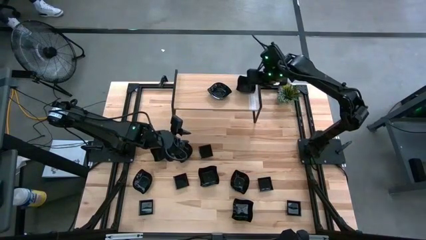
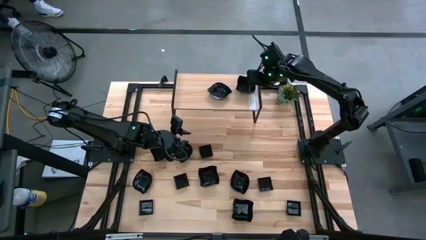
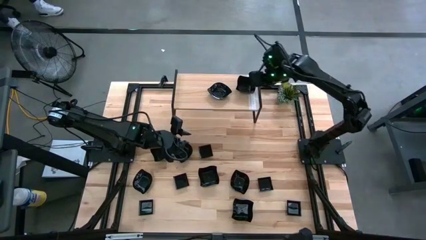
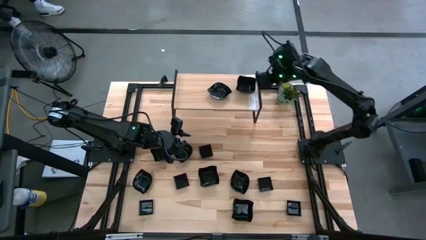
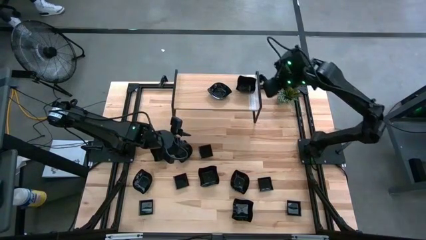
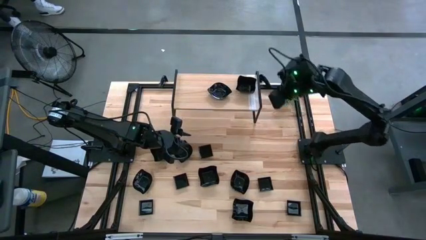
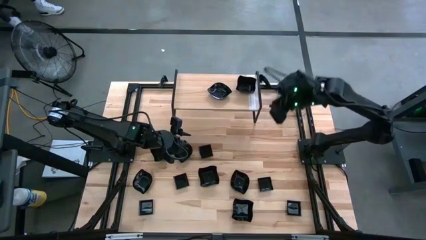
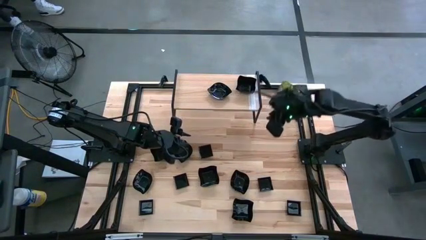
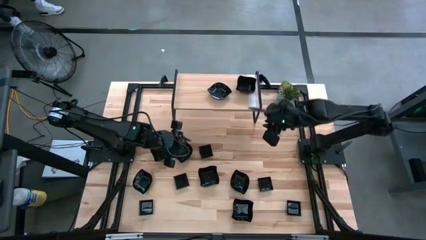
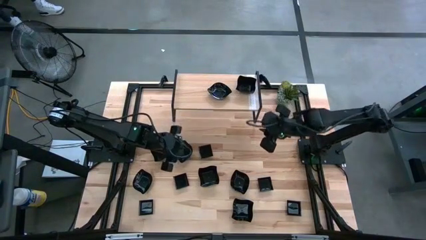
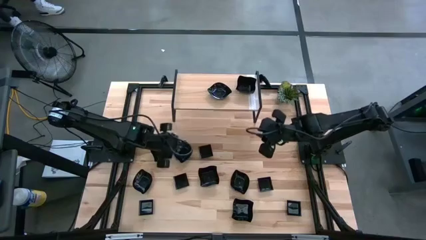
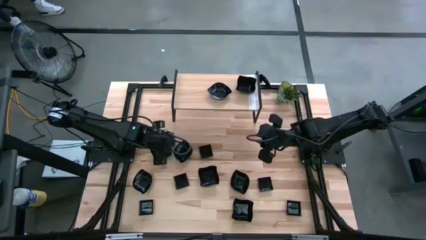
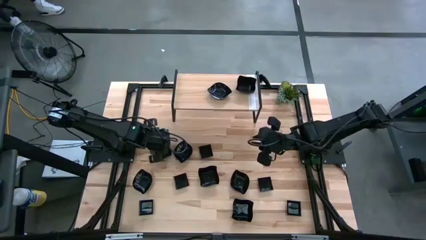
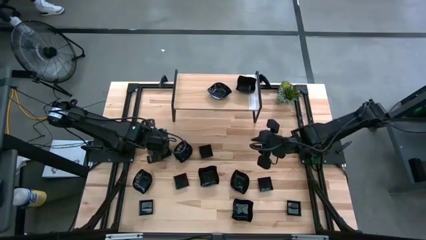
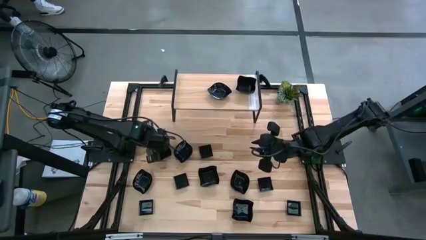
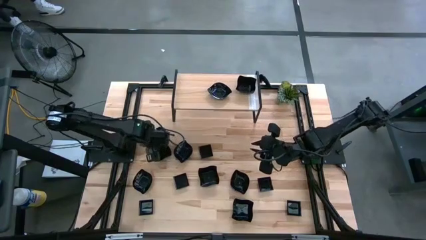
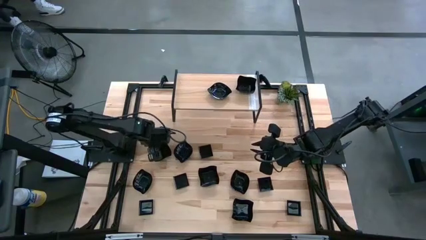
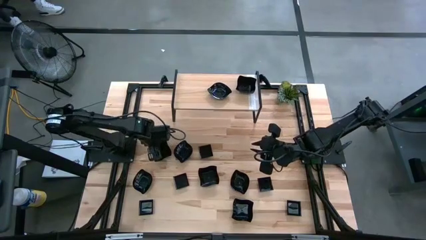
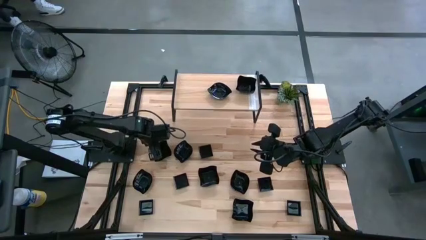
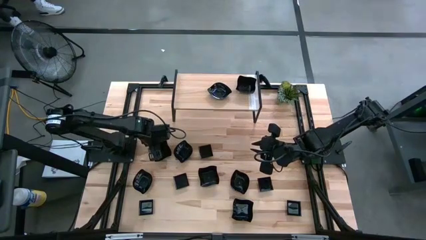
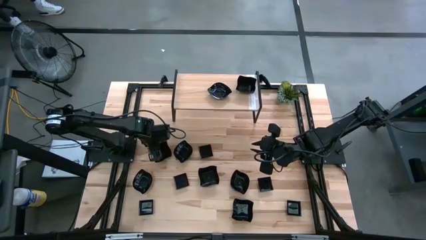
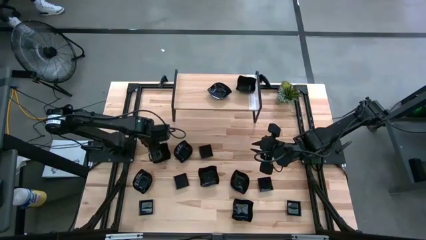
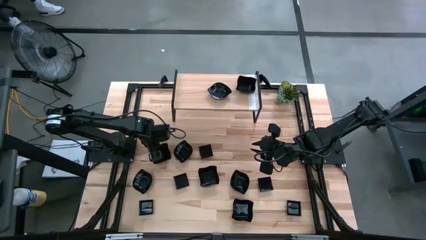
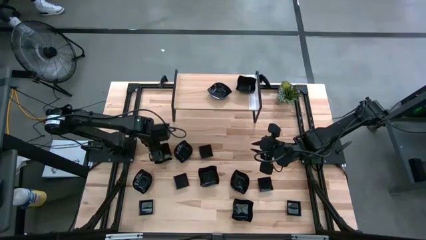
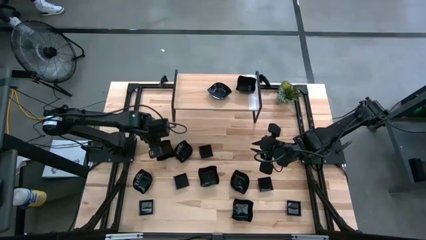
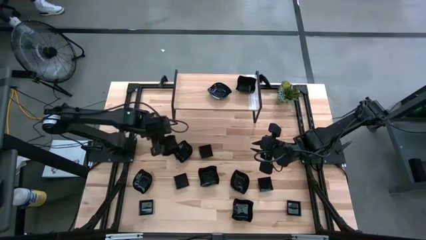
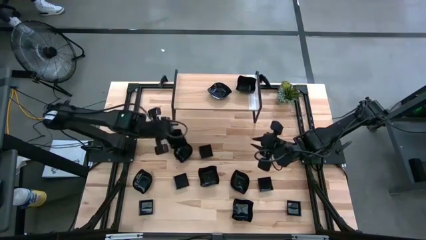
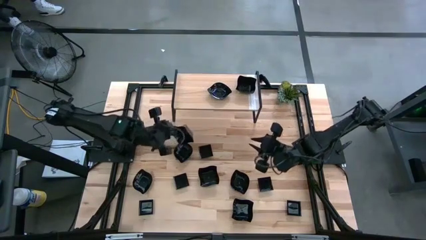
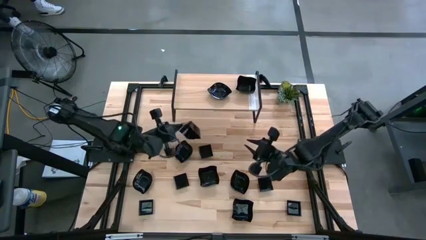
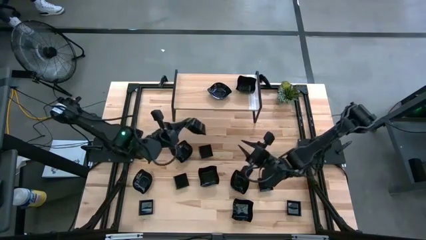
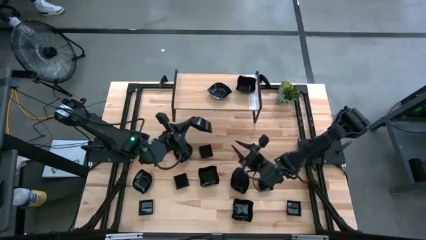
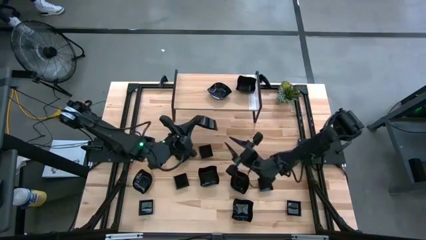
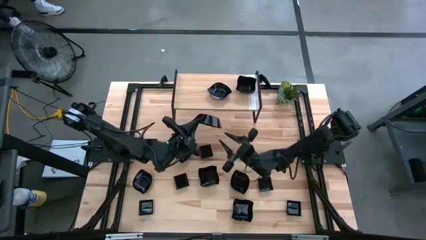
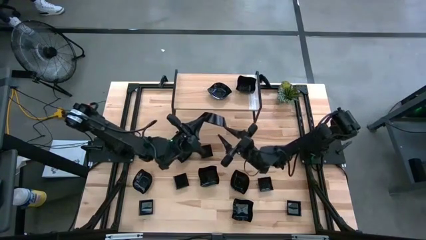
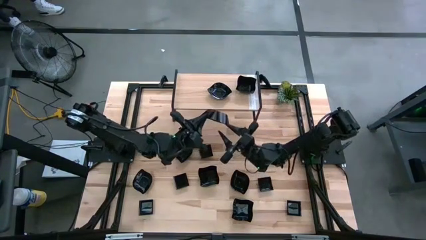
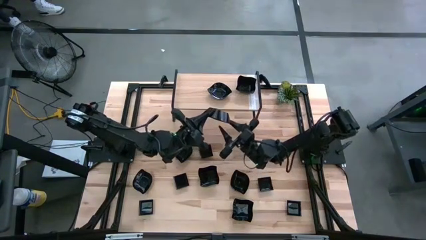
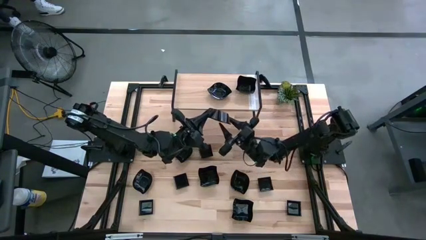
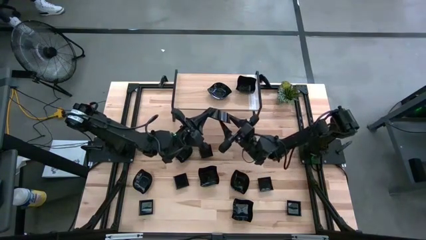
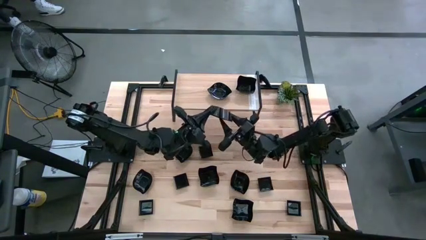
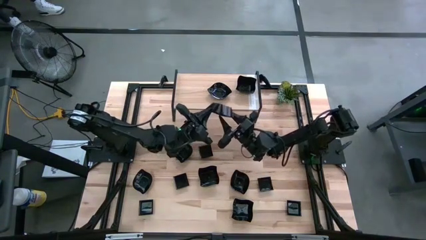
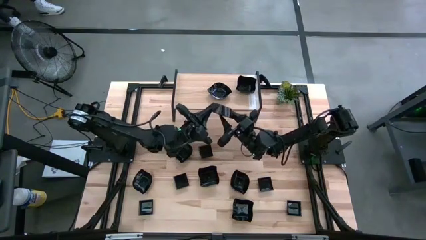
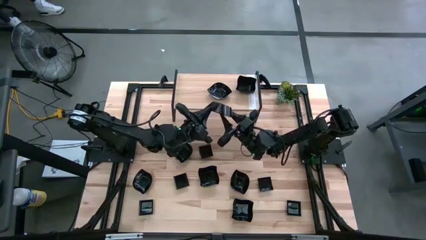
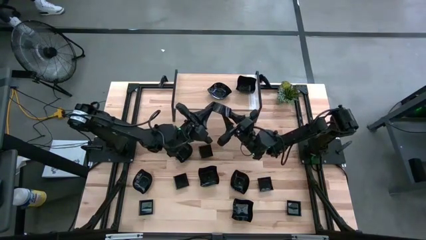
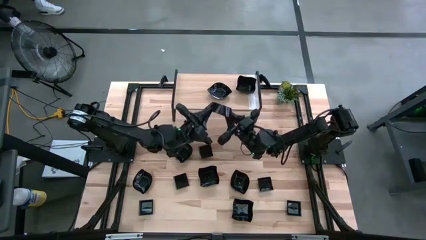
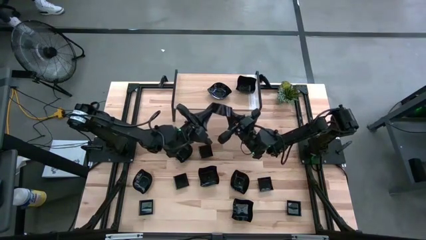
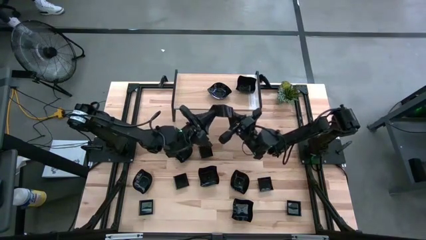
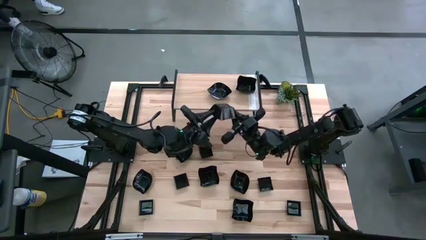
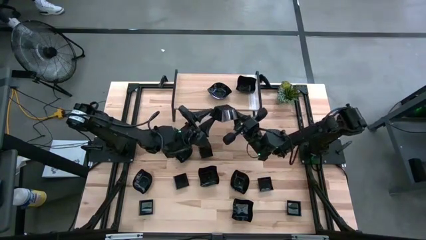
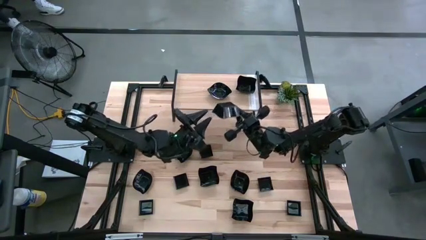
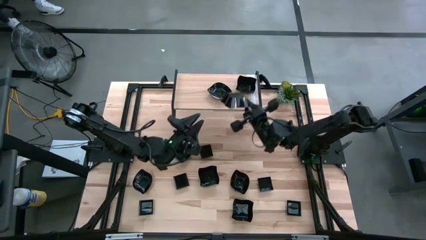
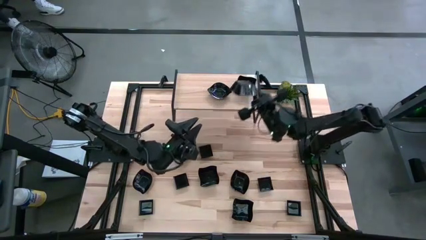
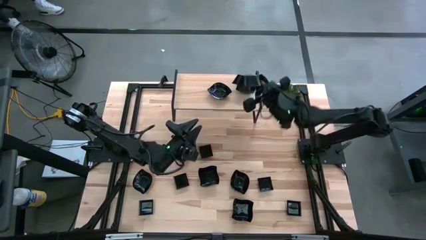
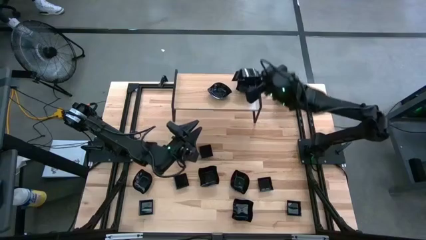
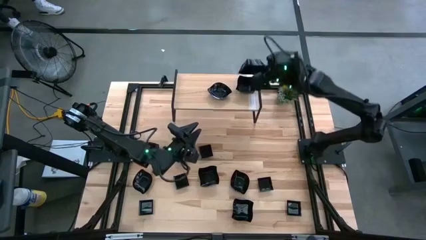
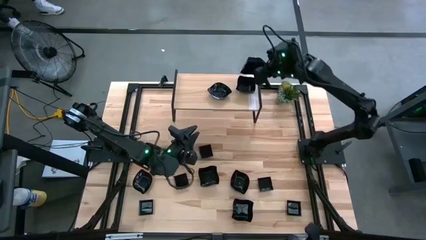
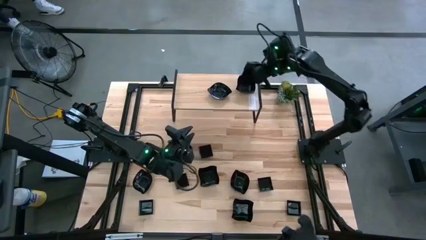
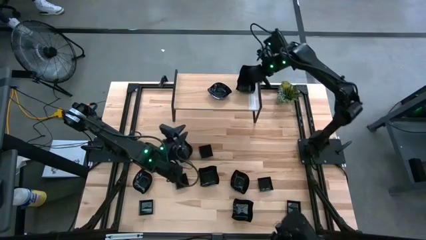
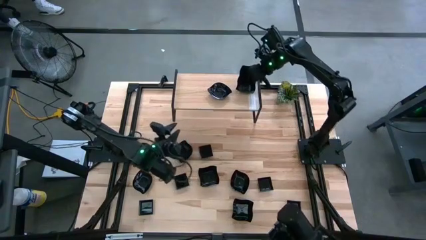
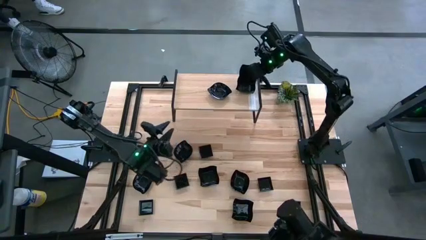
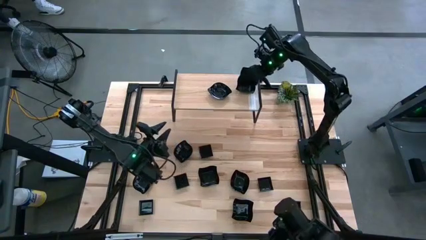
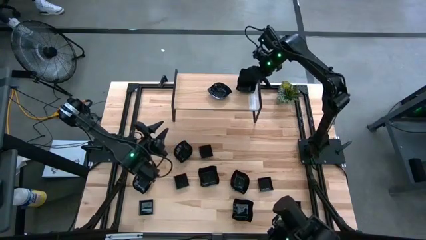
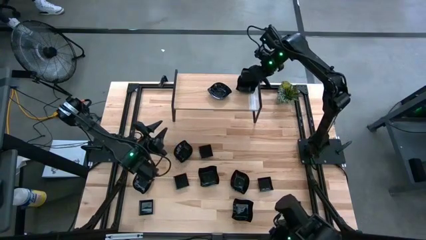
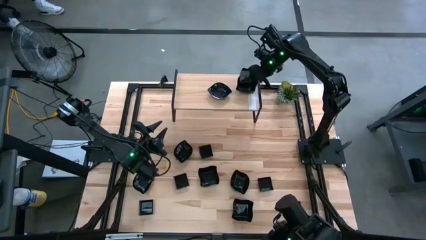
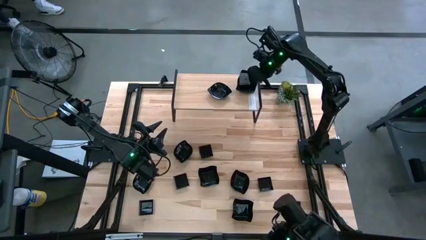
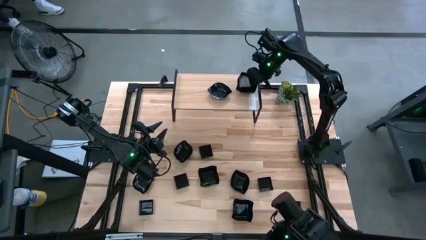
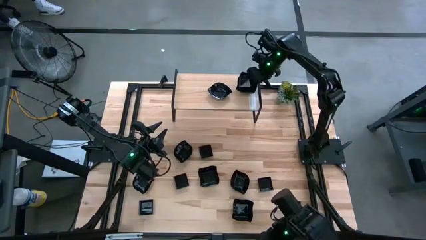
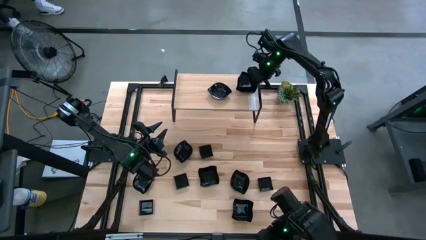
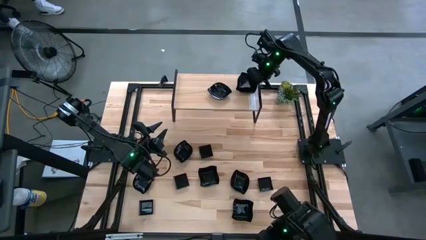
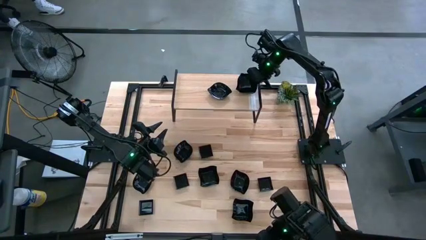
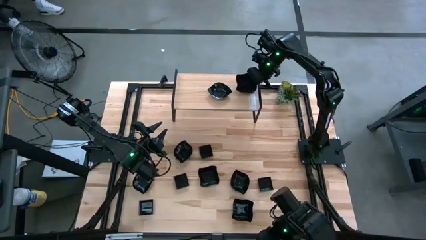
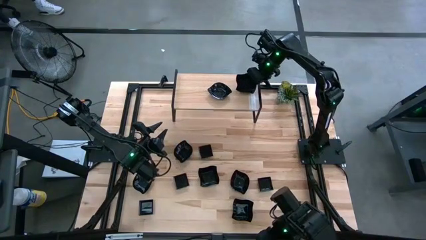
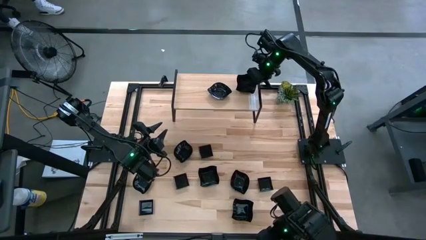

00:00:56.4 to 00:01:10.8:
Task: Pick & Place Mini shaped plates
Stack the distorted square plate on top of the other distorted square plates on the shelf
